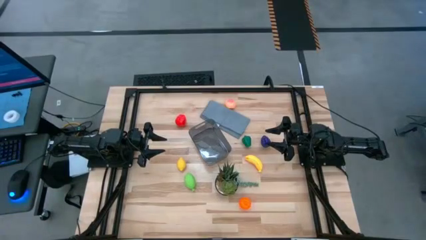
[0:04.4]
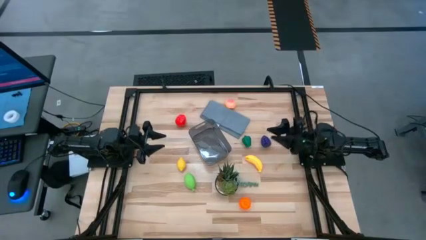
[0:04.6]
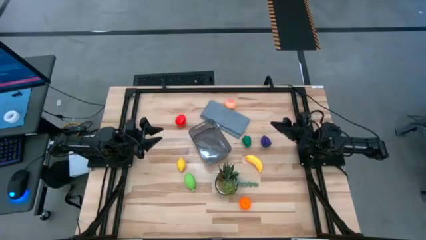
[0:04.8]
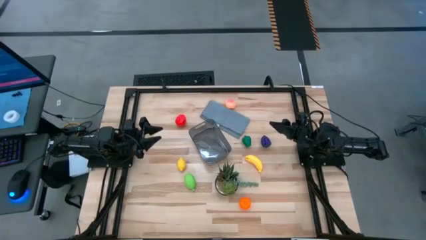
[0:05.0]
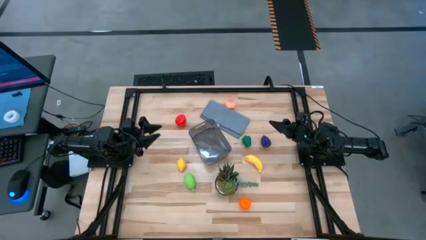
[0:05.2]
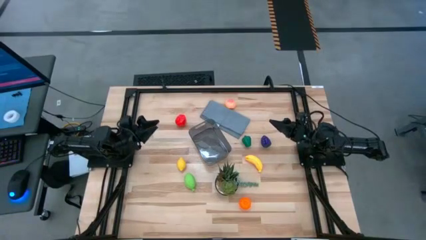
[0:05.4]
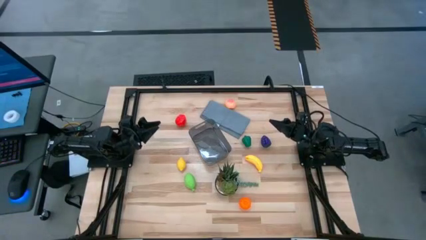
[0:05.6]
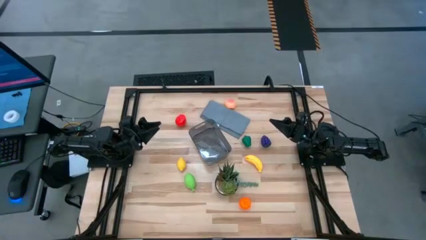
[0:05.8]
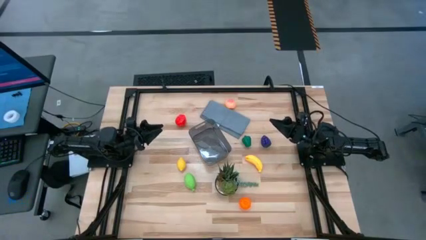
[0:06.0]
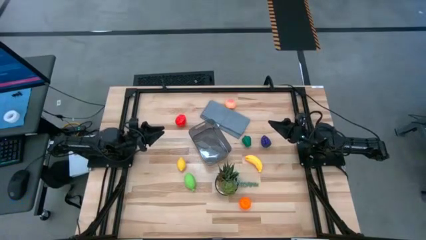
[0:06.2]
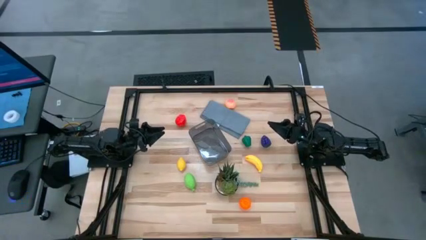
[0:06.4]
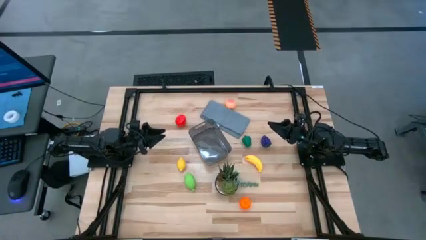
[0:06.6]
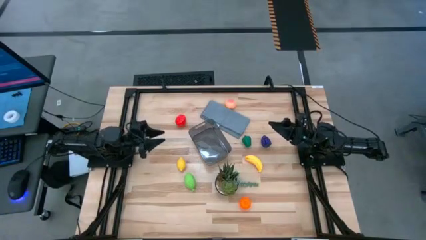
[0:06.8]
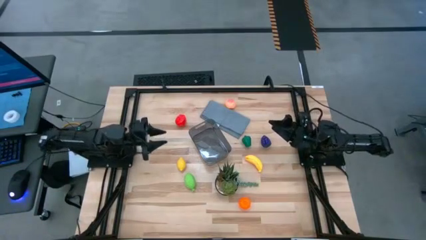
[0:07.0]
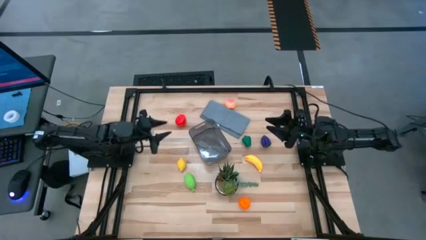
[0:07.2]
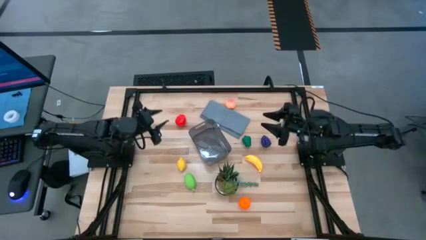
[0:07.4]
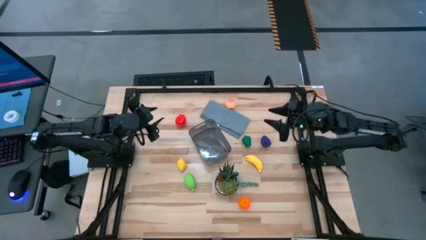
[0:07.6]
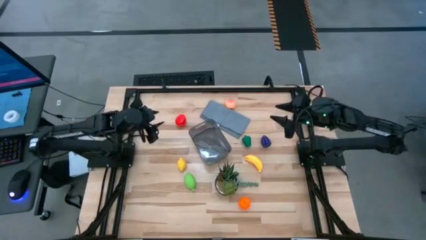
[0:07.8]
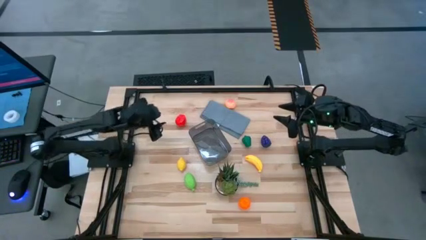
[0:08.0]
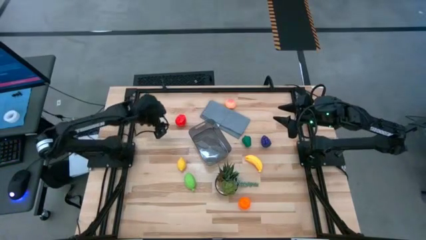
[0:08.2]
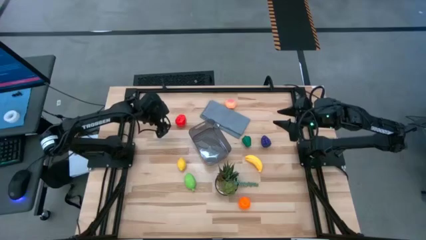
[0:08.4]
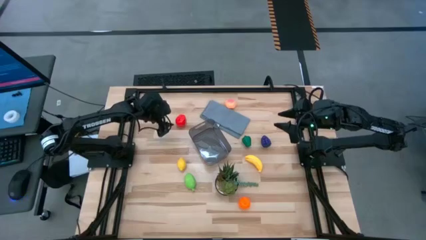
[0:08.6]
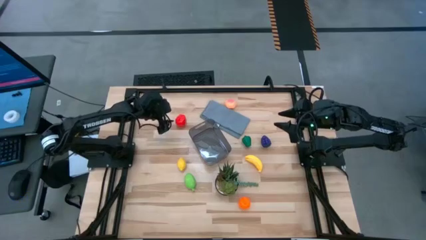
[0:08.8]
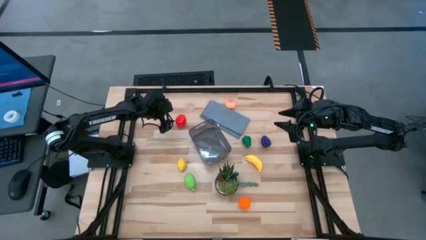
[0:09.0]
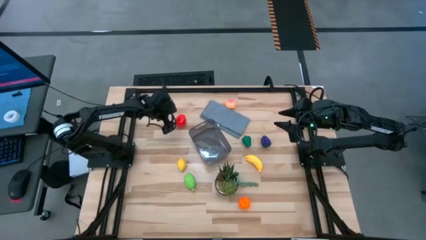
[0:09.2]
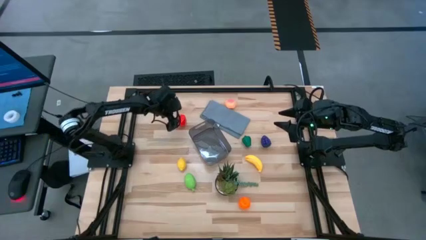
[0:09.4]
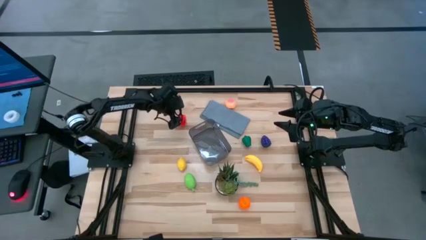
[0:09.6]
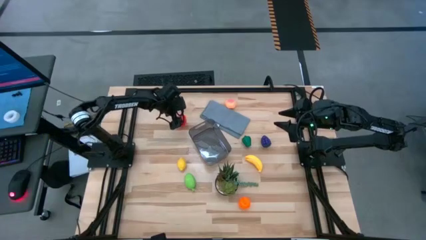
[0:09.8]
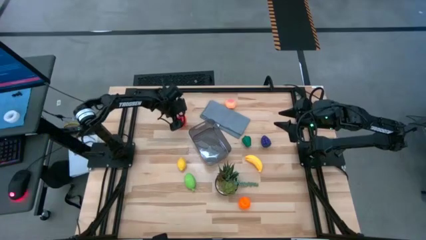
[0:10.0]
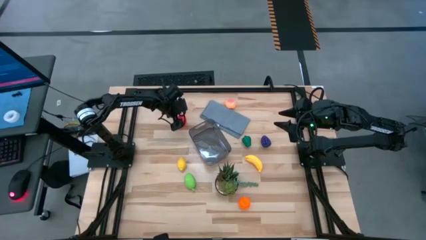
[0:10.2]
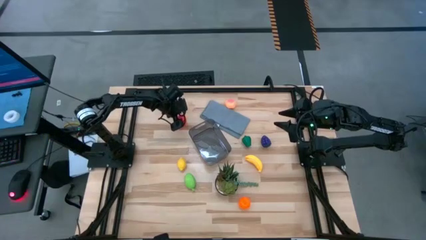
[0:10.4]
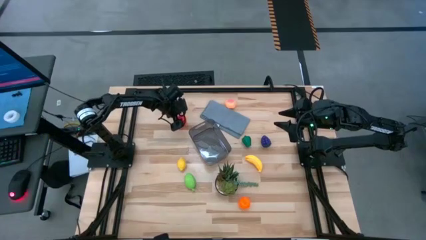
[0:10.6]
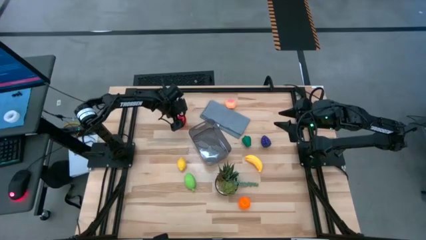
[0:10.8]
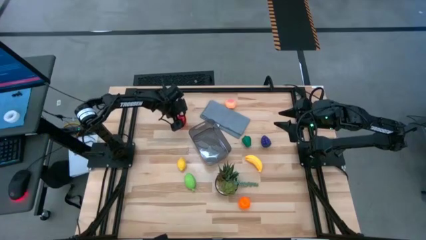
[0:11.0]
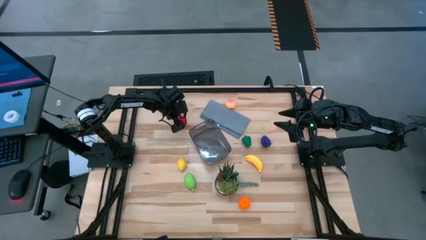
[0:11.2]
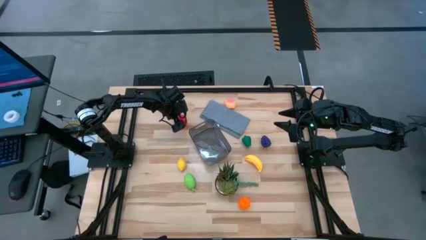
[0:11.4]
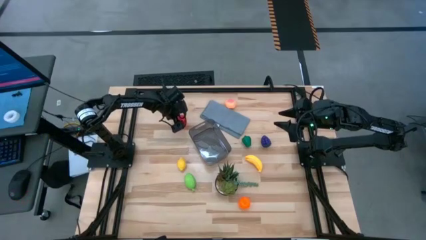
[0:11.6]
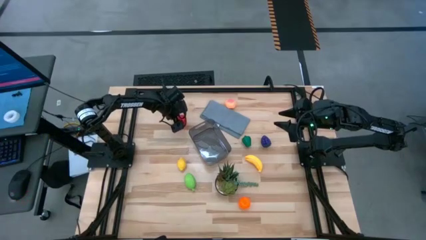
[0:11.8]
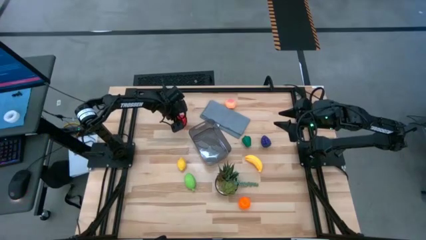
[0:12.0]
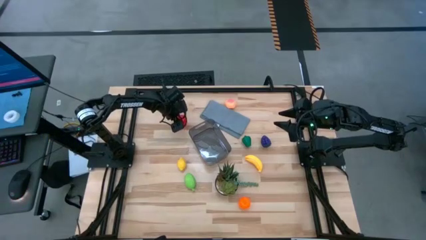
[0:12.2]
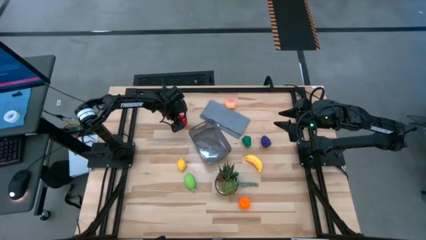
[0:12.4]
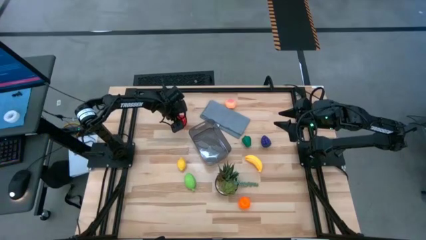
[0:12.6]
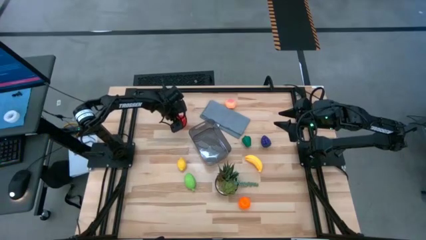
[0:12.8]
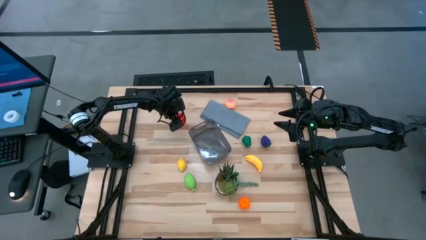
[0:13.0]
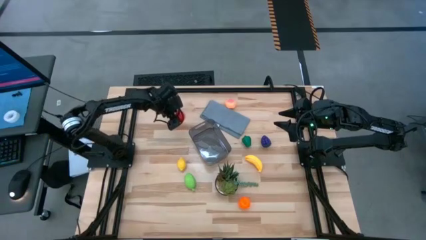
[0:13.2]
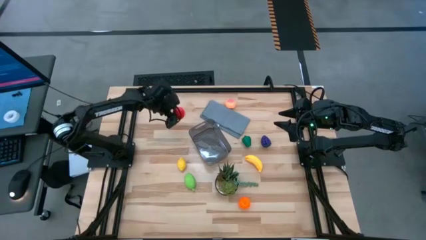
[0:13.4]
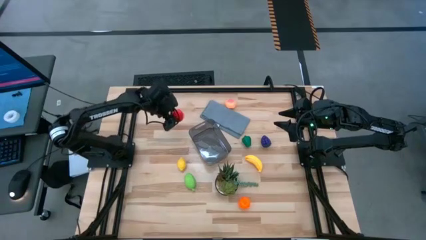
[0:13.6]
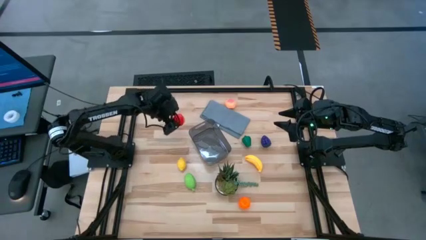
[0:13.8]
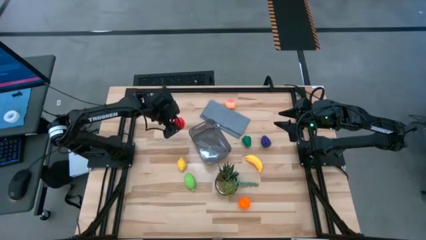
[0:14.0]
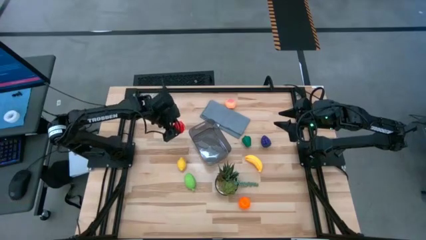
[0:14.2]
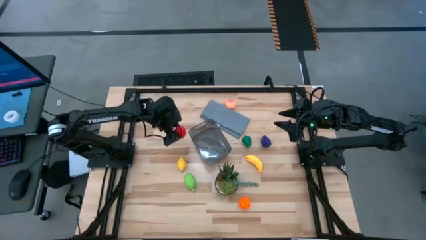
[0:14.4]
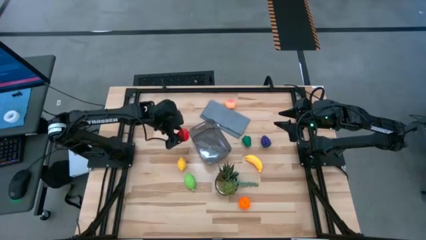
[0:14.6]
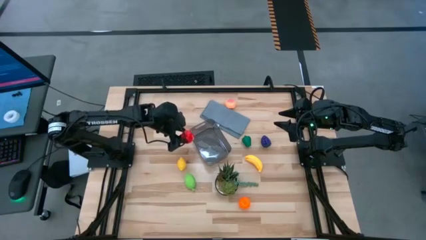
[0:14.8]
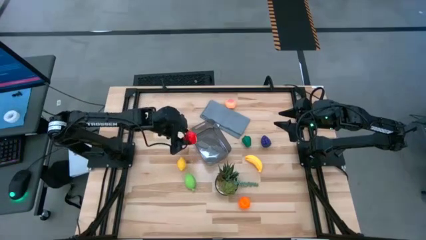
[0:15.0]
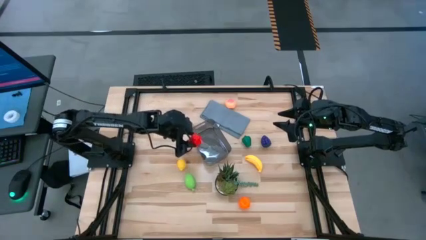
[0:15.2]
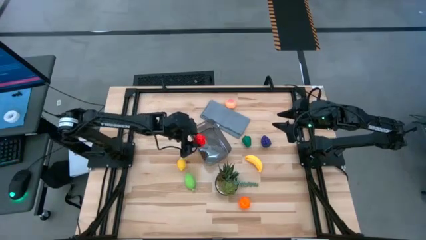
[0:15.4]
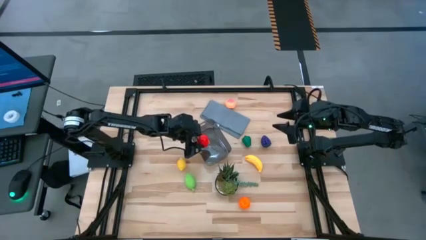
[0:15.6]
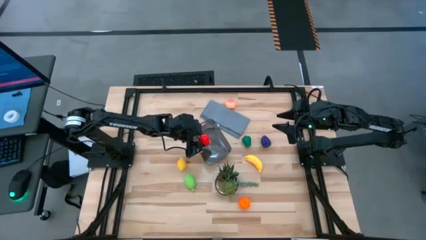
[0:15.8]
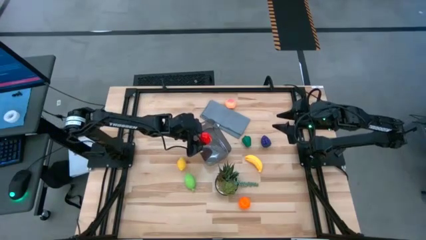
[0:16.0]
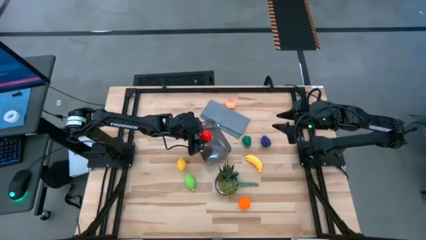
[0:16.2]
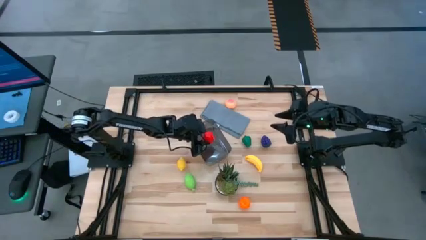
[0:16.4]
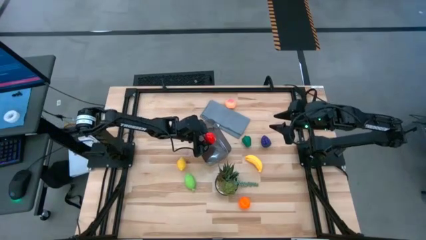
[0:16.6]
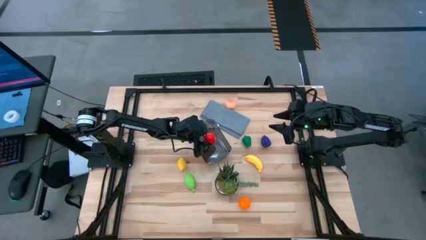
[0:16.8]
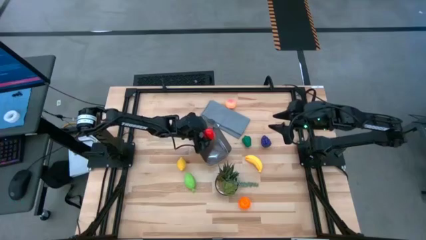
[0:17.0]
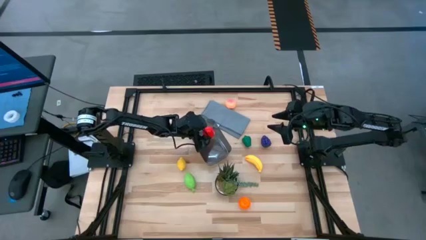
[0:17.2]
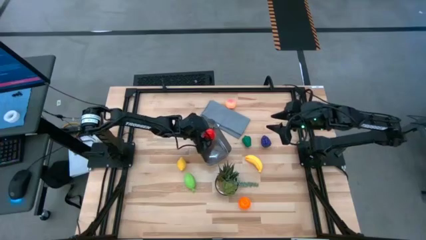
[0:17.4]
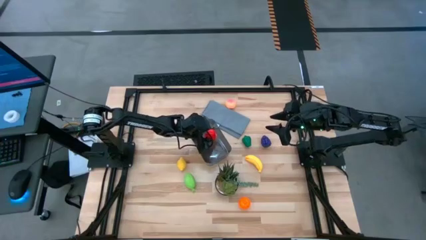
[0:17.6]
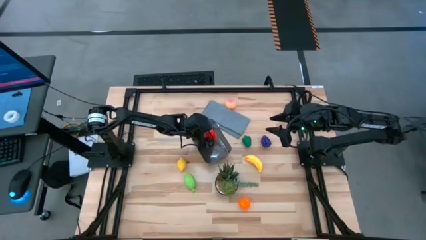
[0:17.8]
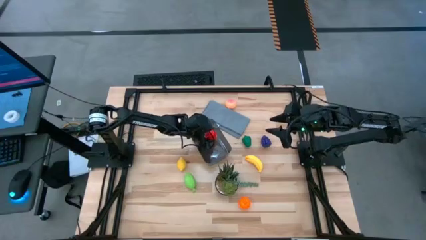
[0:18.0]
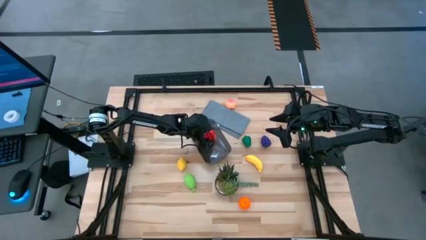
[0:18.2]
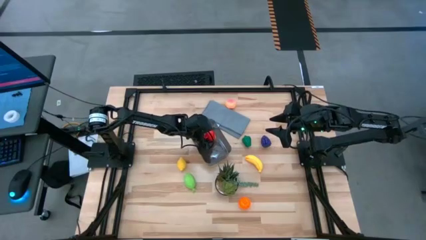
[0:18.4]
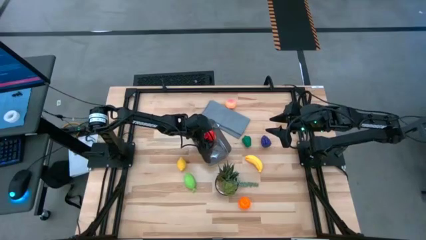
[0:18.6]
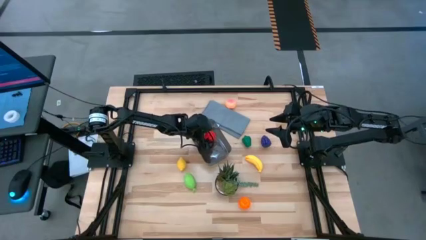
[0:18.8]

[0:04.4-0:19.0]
Task: Pick and placing Produce into tupperware
Put the red apple into the black bin
